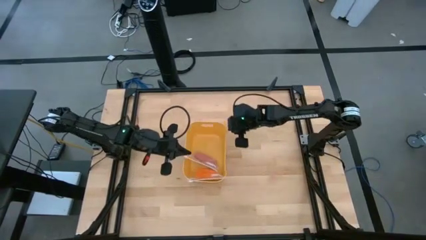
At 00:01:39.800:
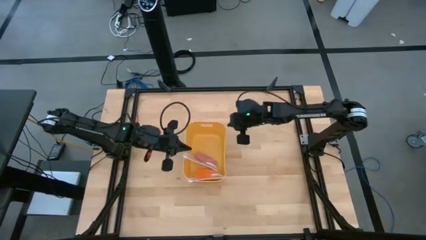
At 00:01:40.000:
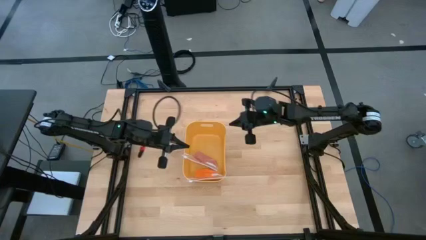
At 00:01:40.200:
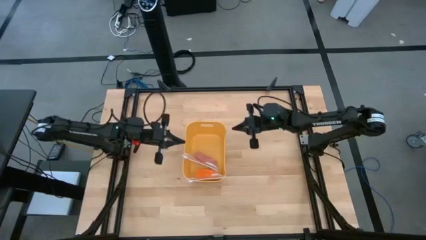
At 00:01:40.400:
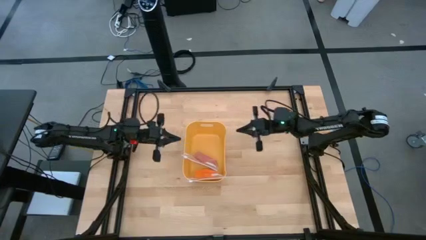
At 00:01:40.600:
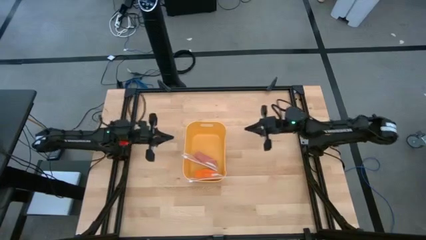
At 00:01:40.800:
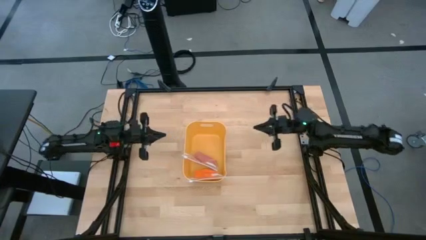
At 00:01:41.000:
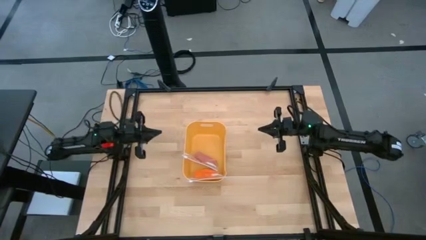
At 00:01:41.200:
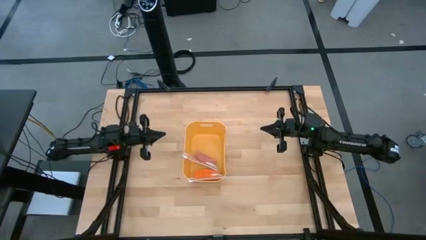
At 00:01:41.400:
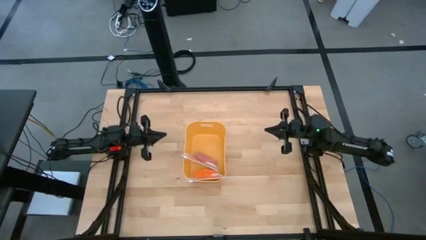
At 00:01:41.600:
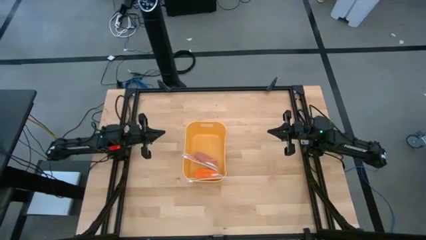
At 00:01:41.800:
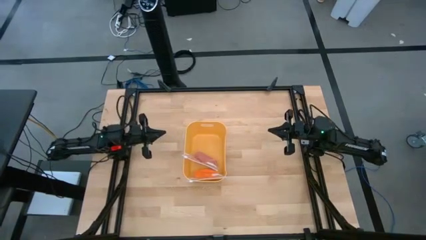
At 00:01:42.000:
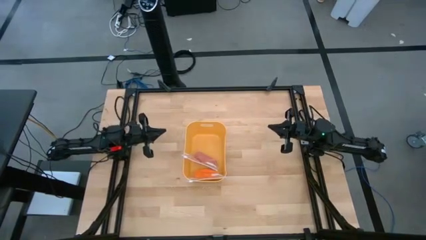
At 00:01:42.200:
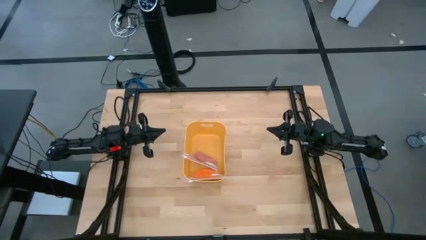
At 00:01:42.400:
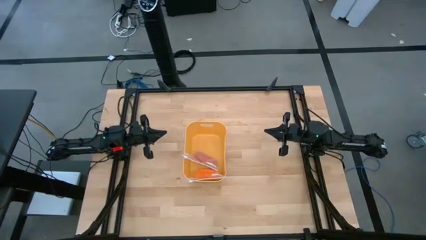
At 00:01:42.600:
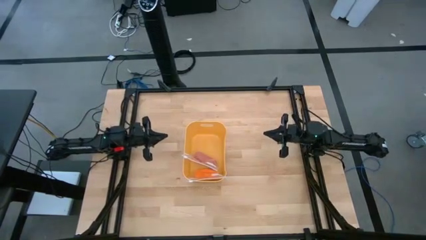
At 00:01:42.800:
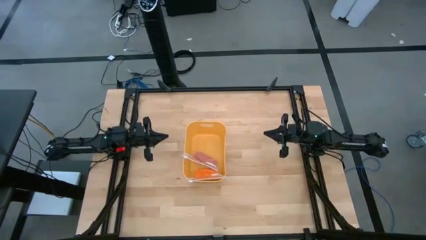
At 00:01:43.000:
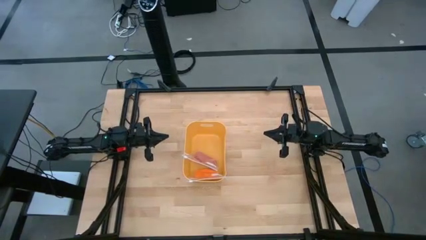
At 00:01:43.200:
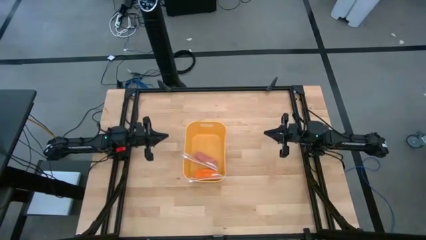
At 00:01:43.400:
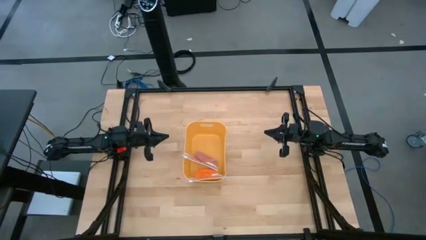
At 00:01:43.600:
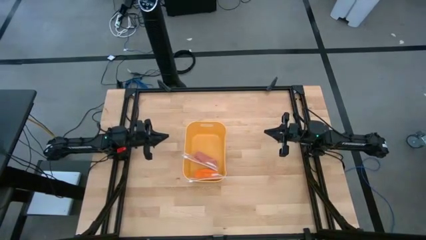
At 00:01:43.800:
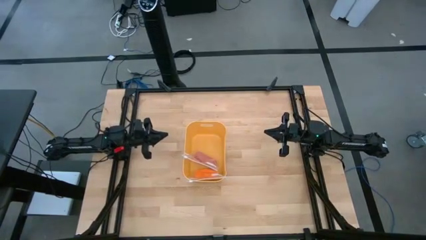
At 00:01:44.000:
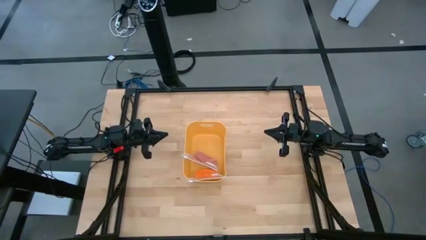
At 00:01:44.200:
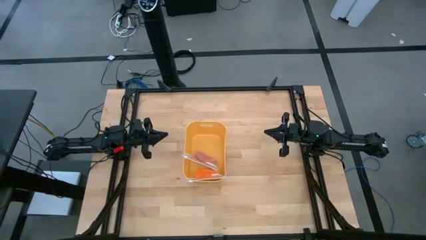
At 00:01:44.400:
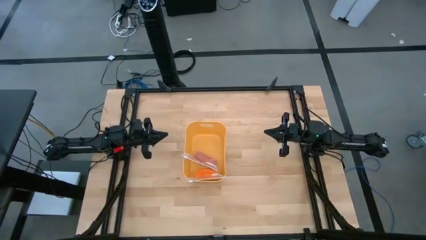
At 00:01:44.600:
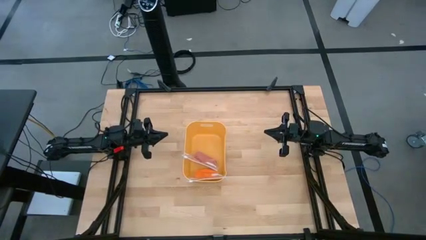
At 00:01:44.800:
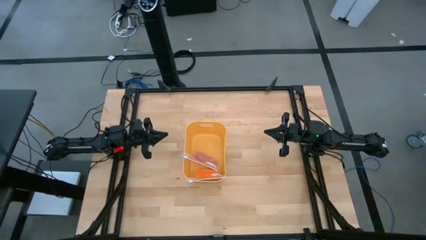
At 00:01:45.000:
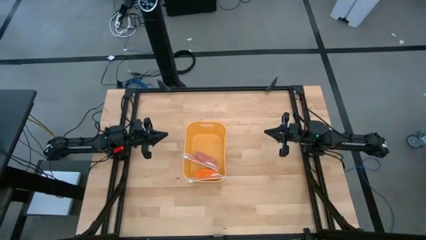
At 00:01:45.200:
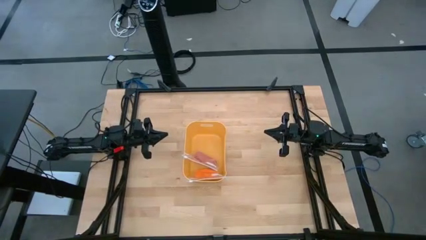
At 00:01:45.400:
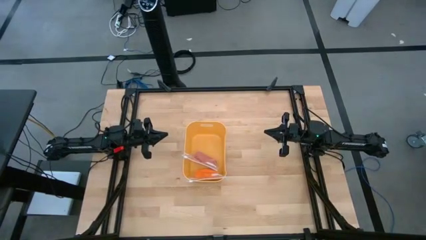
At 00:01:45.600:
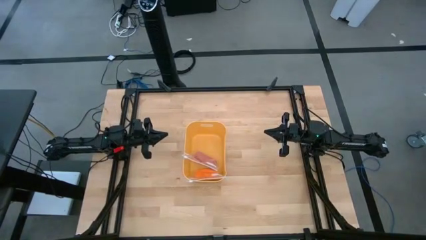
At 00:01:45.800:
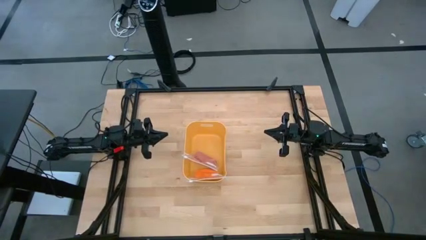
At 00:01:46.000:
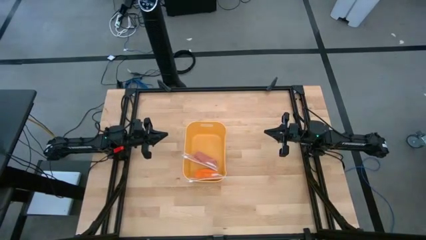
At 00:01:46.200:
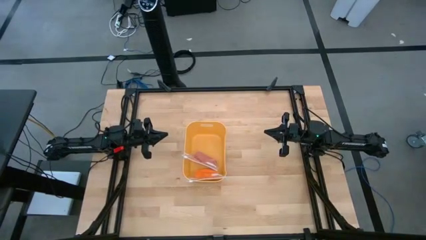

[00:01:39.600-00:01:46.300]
Task: Roll bandage
Return to Home Position
